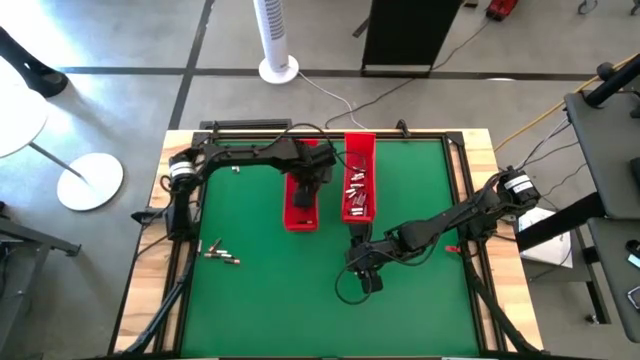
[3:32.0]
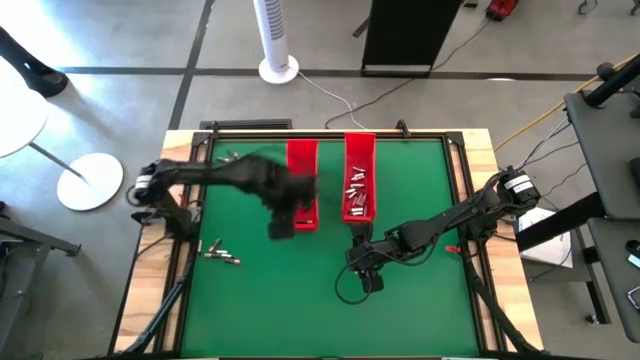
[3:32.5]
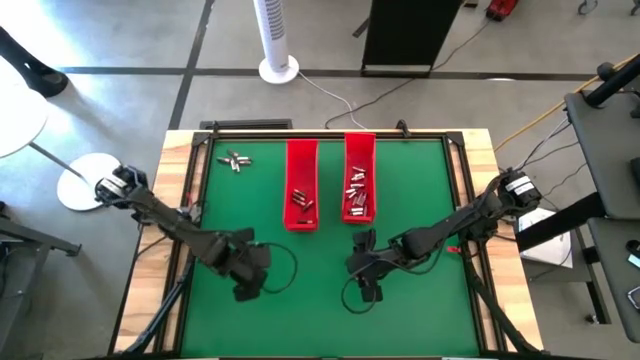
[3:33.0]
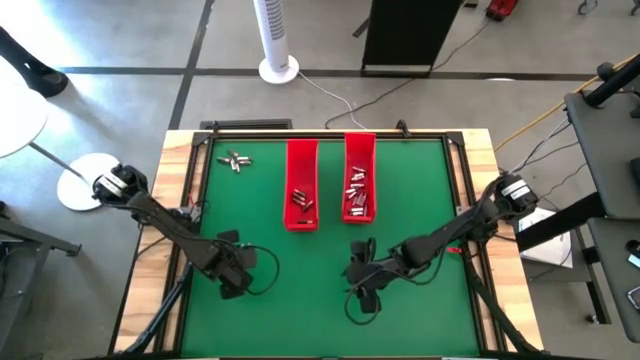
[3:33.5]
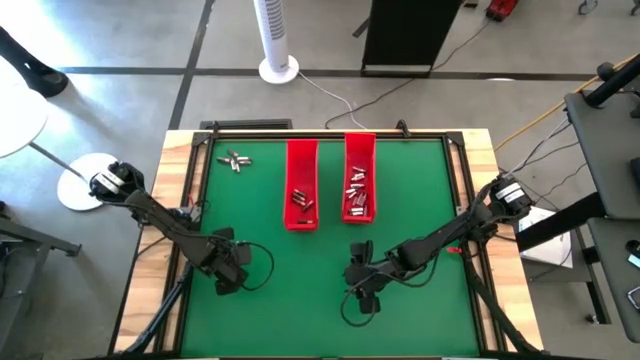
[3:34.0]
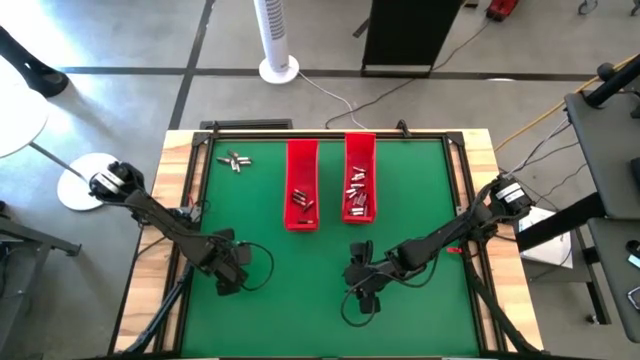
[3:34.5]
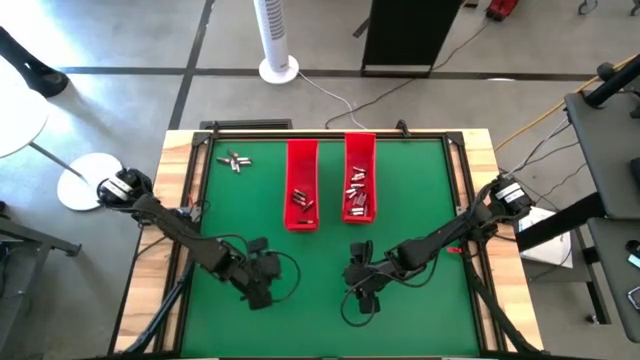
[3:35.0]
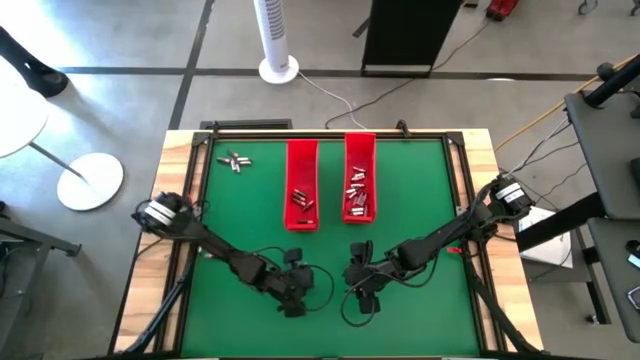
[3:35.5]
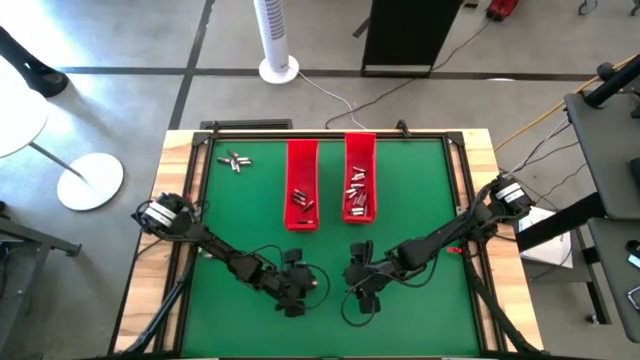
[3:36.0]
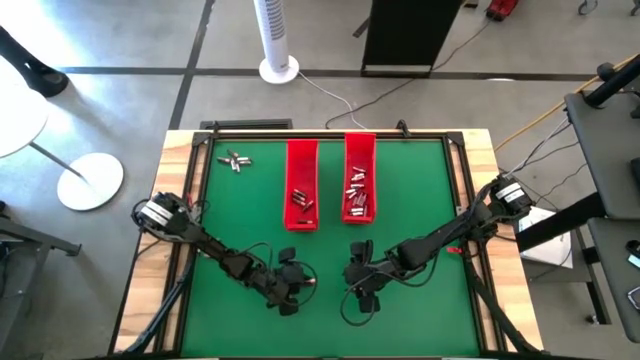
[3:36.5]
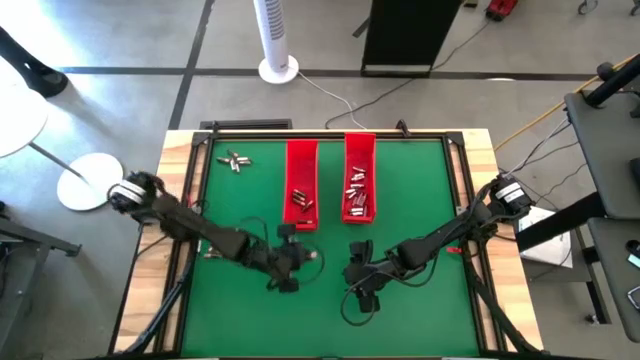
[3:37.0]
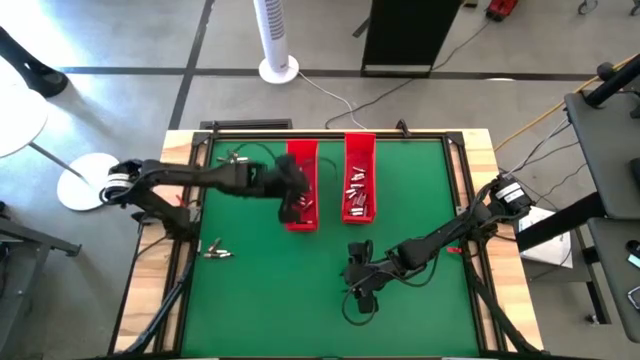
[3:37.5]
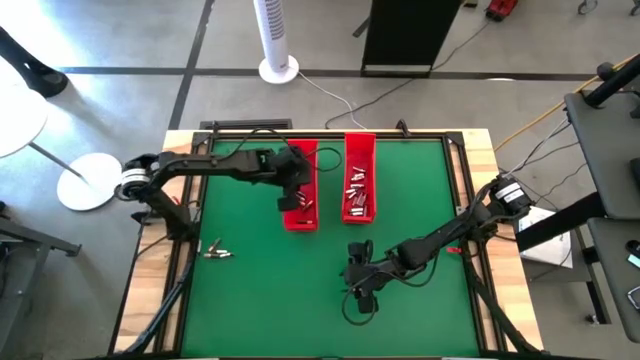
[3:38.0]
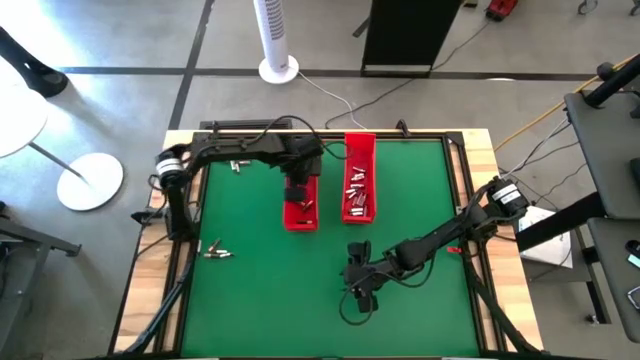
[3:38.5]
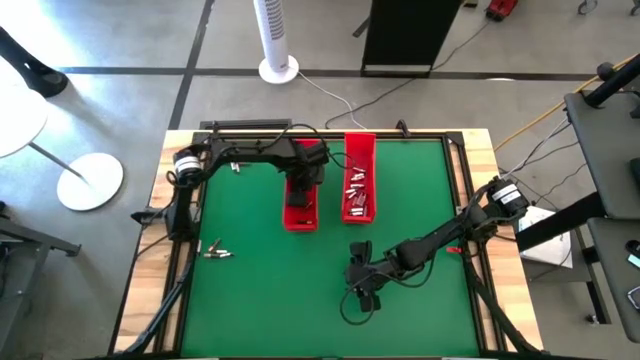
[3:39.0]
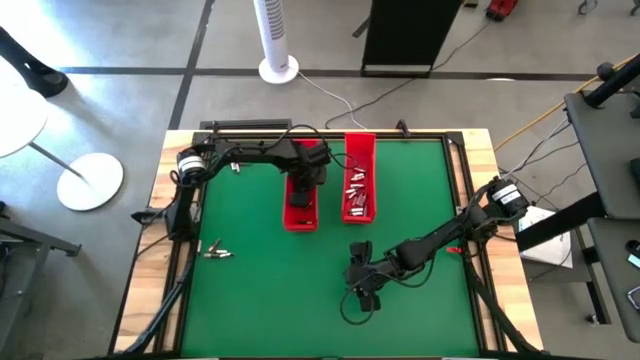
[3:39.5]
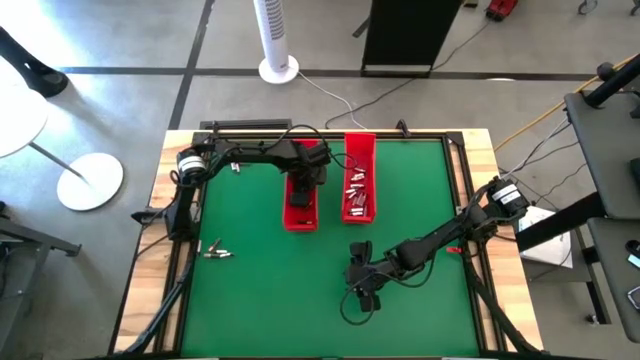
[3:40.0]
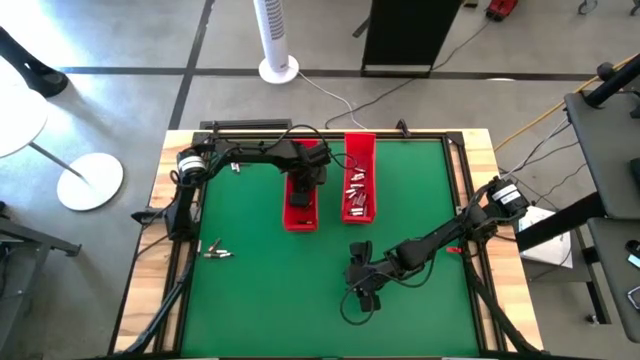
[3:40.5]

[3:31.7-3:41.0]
Task: Sort batteries
Put the black battery into the left red bin

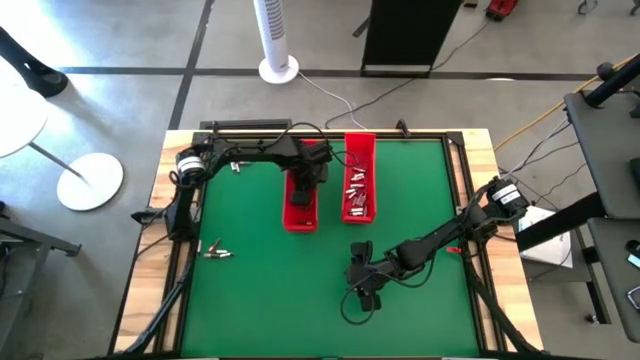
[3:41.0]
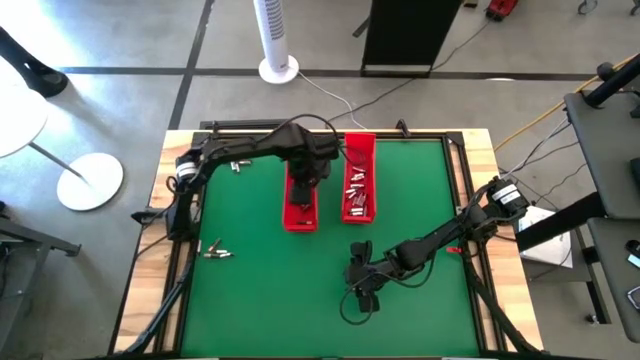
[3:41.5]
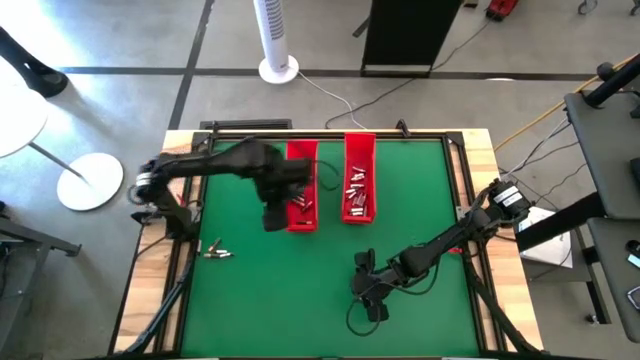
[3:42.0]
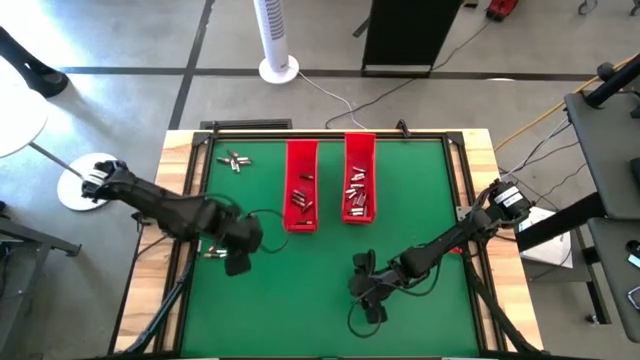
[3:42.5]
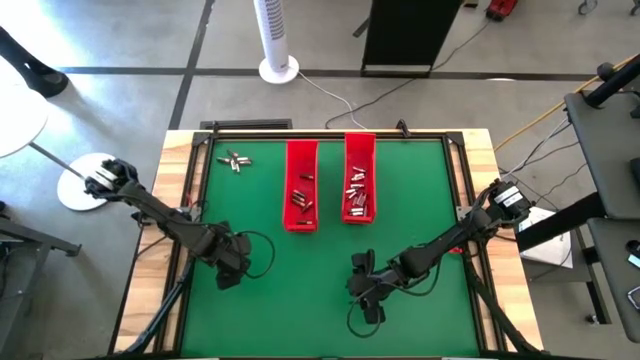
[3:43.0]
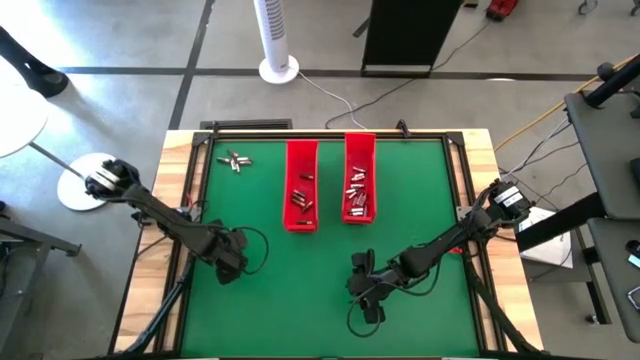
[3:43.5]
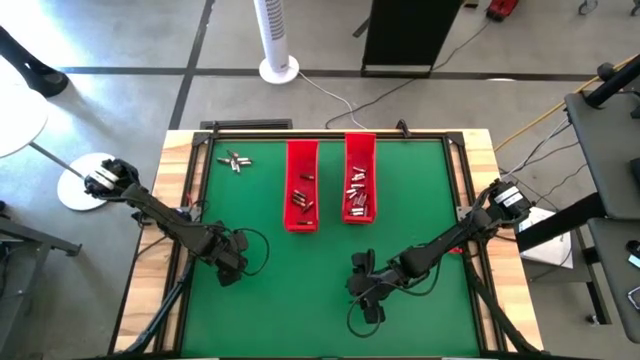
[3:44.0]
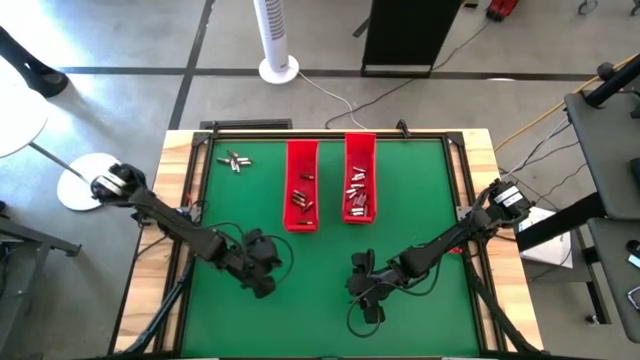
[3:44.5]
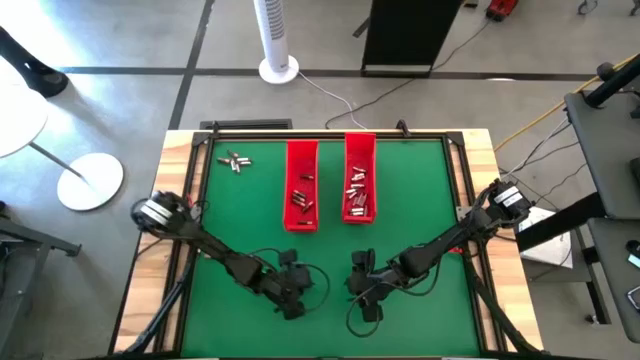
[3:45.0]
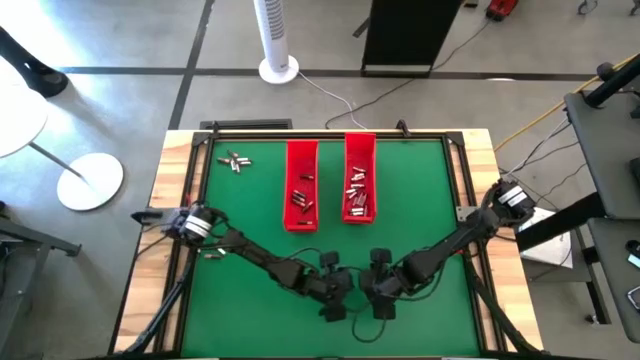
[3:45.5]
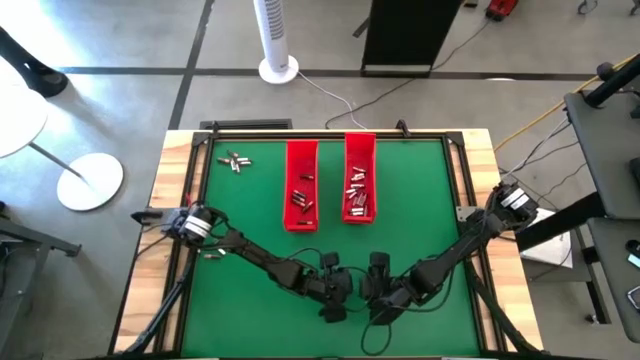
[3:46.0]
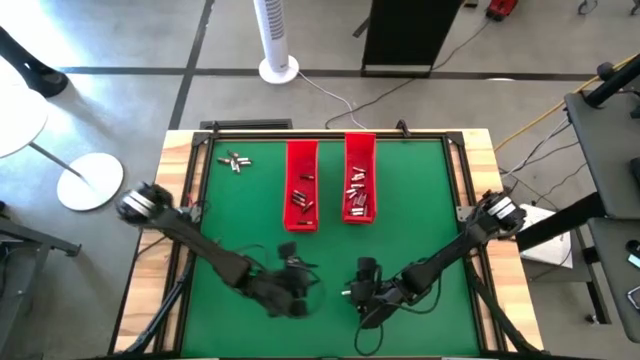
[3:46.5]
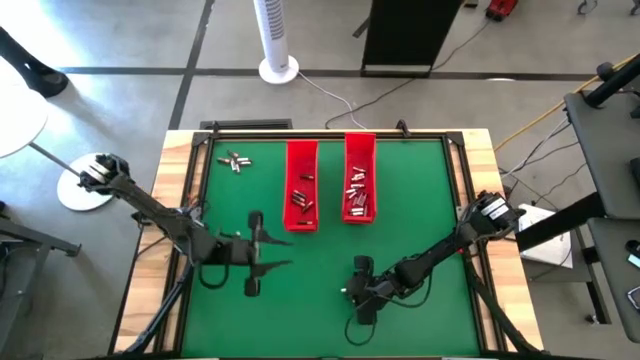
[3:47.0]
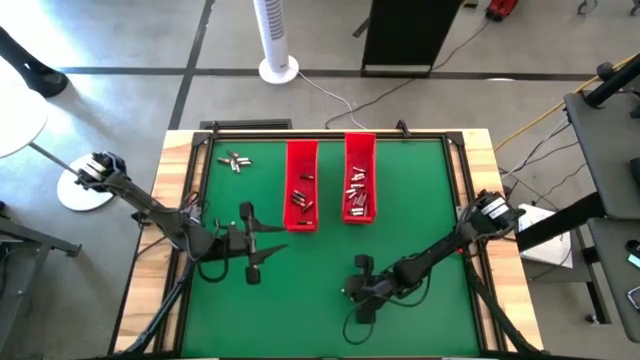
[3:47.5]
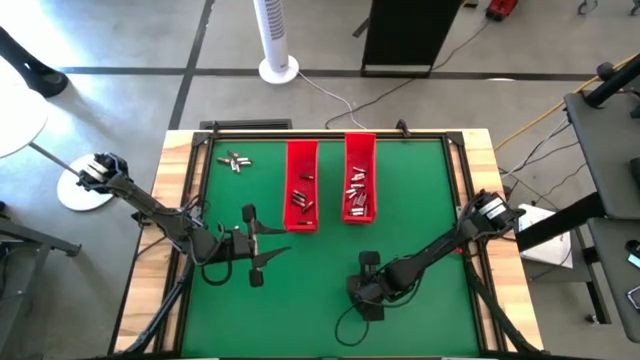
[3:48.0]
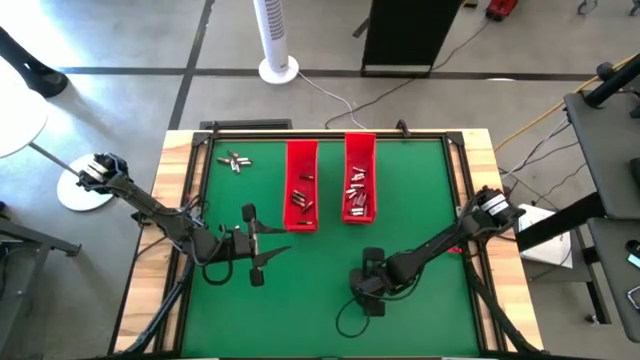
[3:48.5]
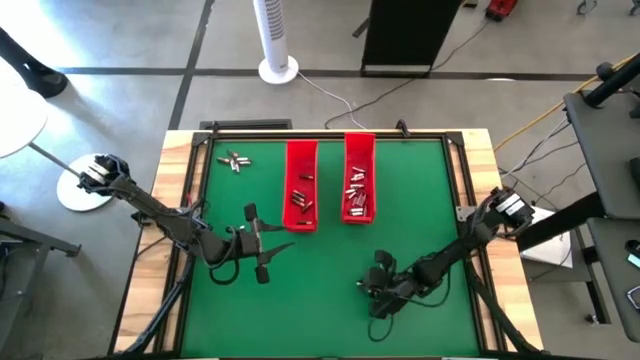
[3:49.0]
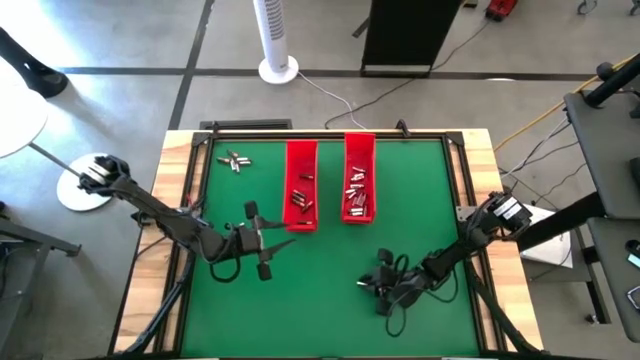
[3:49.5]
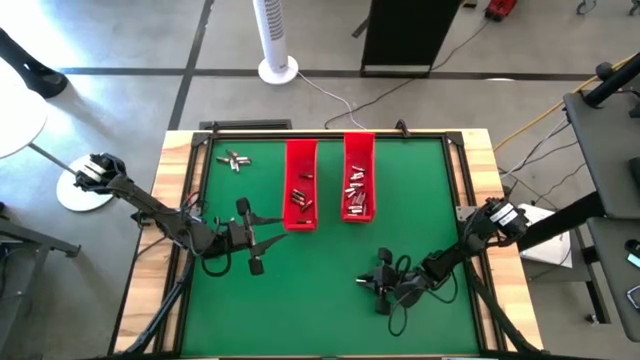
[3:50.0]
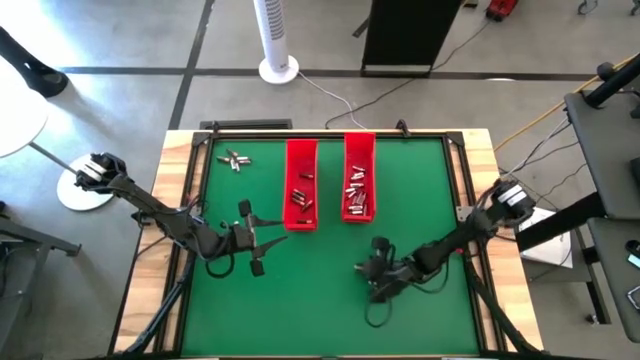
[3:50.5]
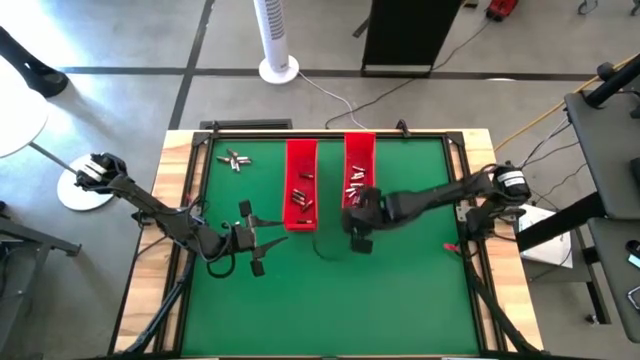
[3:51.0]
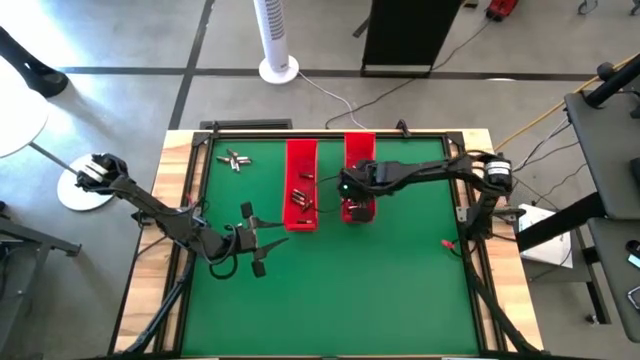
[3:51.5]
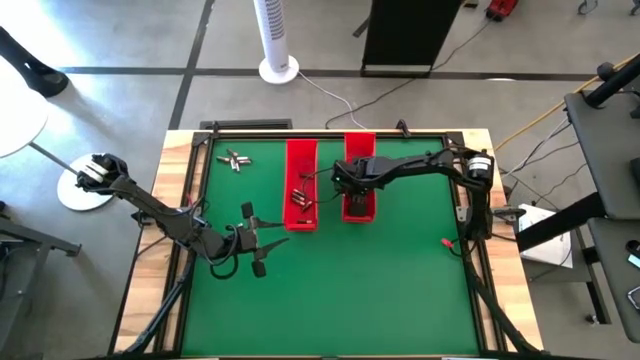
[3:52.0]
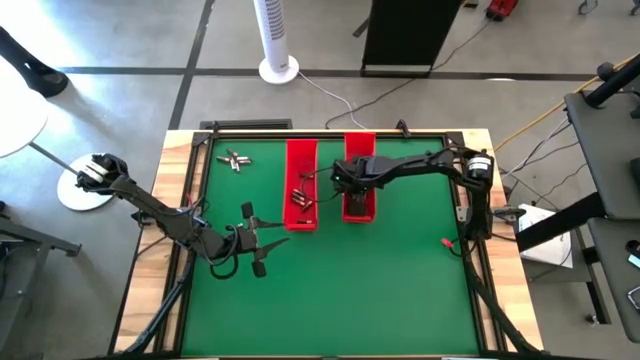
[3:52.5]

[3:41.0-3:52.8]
Put the silver battery into the right red bin
